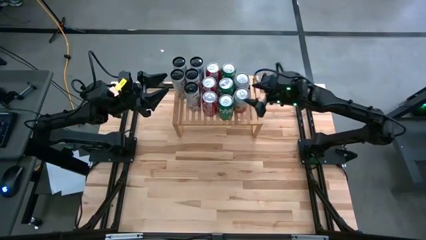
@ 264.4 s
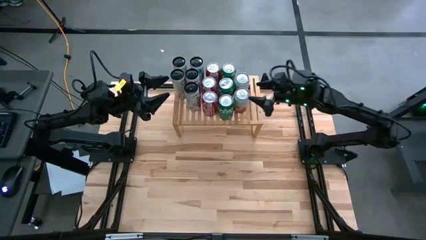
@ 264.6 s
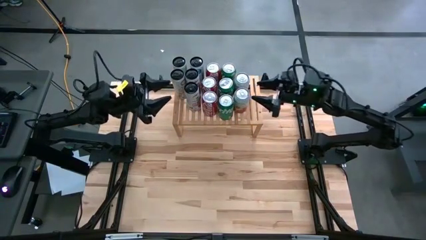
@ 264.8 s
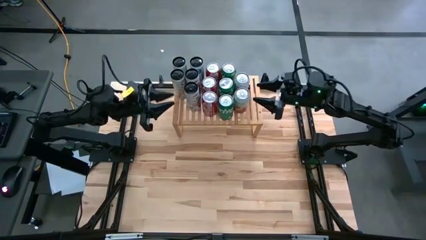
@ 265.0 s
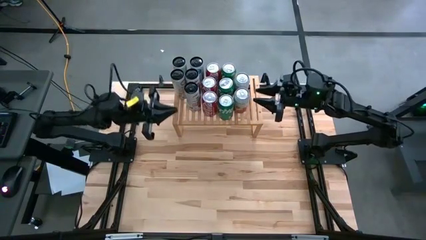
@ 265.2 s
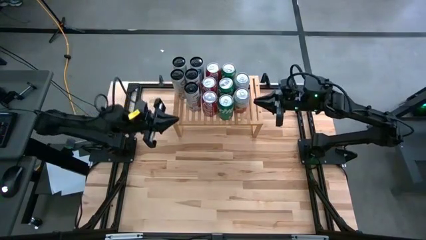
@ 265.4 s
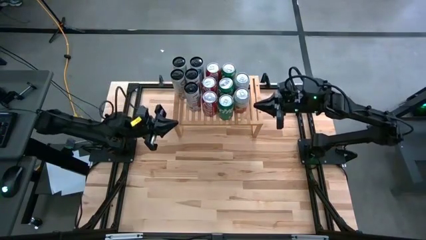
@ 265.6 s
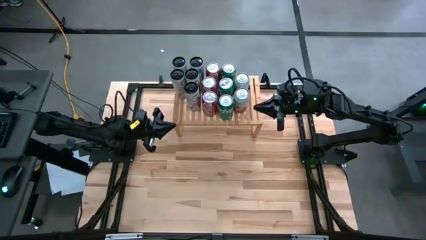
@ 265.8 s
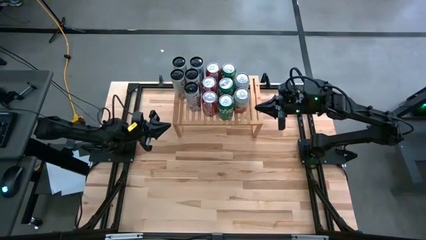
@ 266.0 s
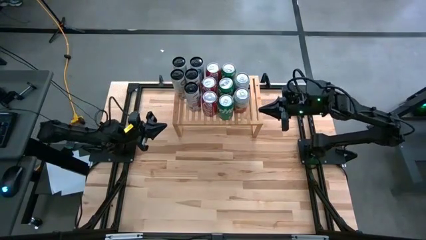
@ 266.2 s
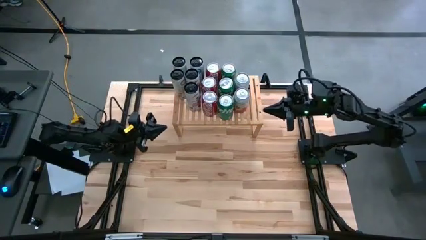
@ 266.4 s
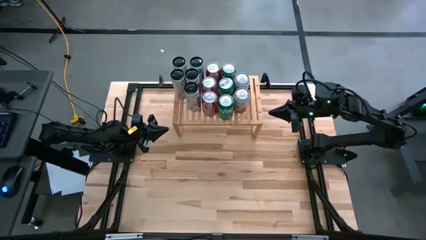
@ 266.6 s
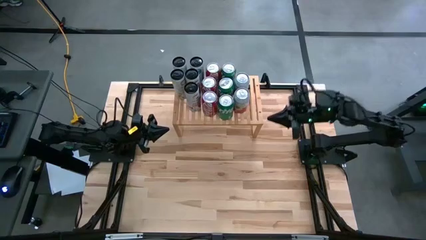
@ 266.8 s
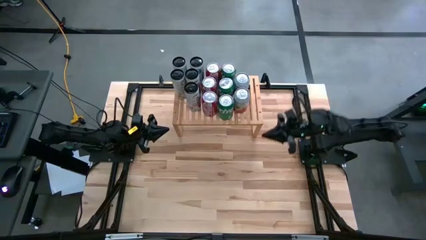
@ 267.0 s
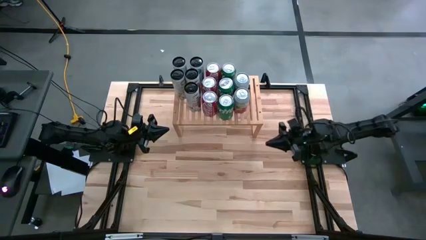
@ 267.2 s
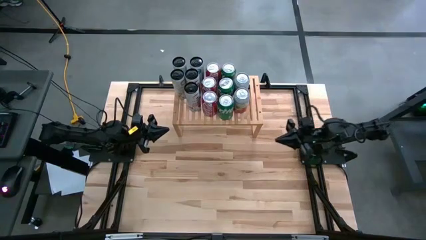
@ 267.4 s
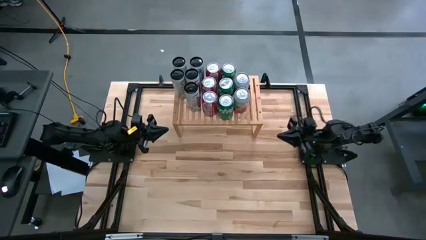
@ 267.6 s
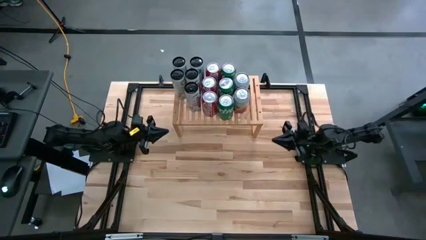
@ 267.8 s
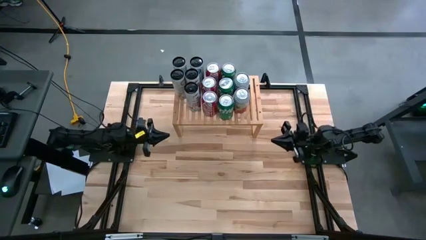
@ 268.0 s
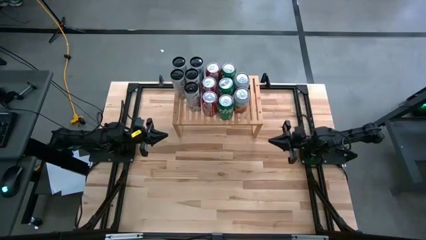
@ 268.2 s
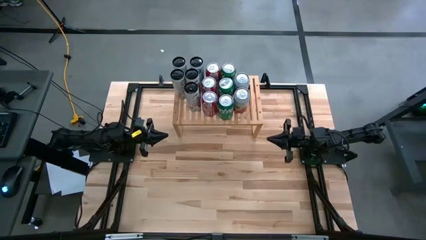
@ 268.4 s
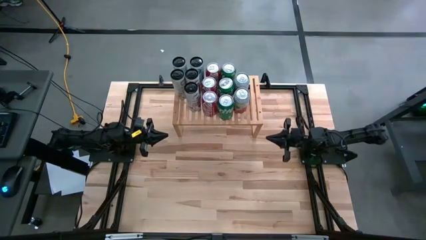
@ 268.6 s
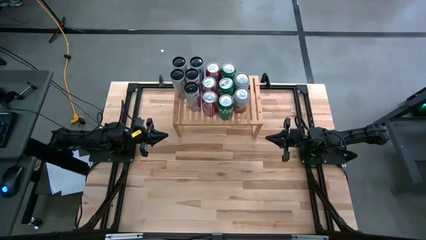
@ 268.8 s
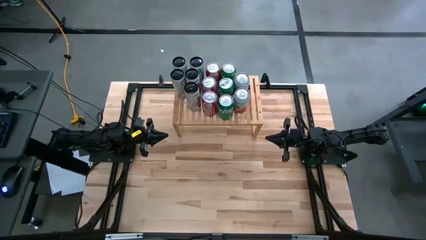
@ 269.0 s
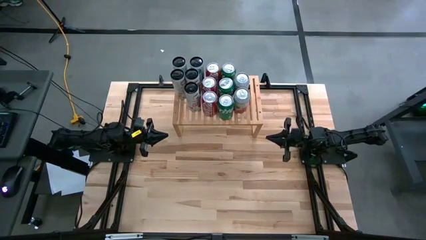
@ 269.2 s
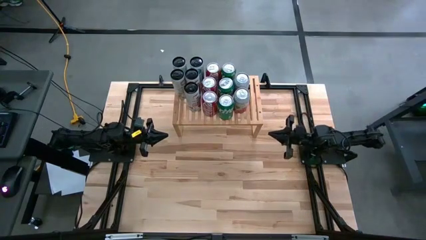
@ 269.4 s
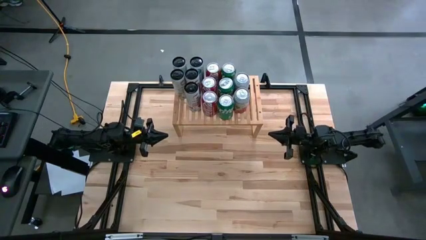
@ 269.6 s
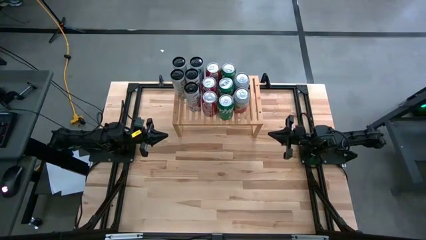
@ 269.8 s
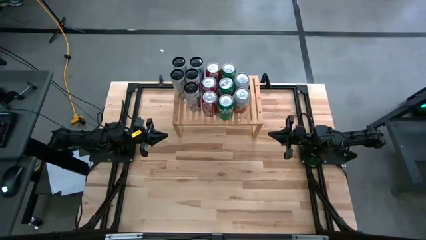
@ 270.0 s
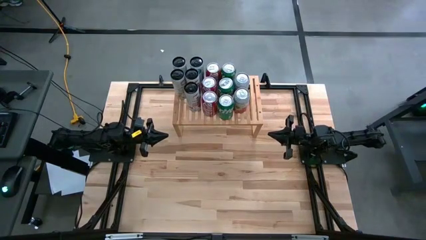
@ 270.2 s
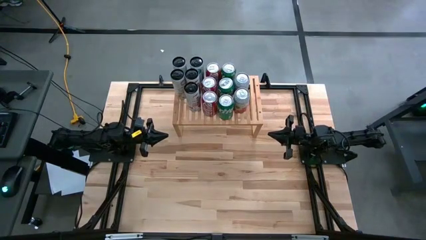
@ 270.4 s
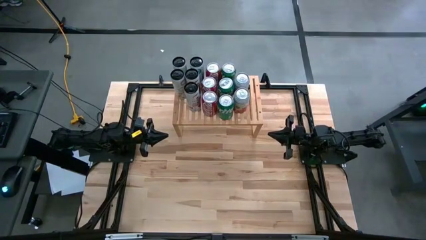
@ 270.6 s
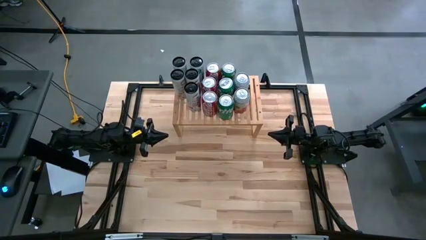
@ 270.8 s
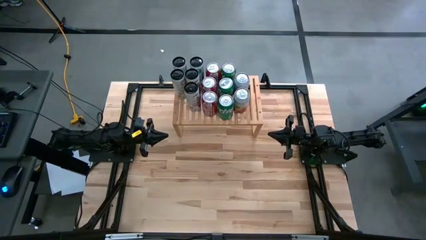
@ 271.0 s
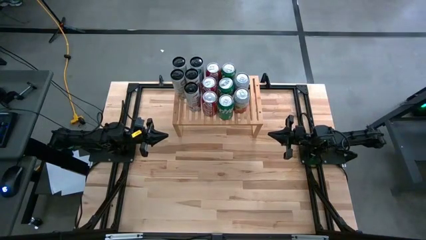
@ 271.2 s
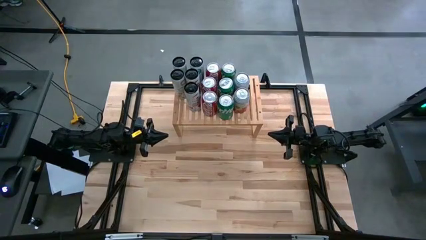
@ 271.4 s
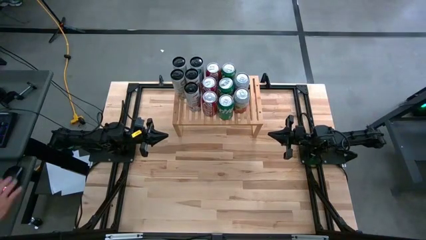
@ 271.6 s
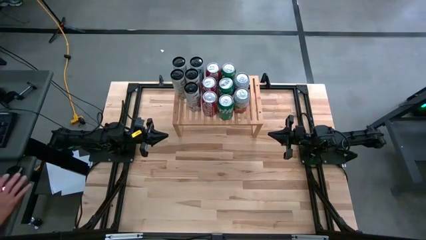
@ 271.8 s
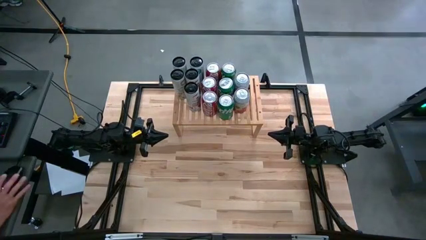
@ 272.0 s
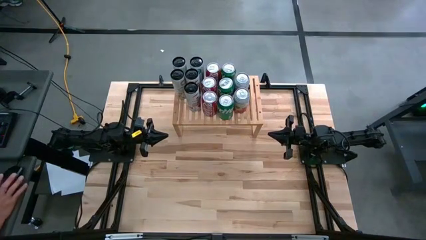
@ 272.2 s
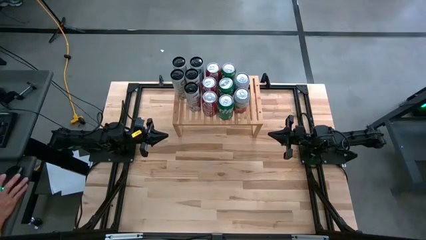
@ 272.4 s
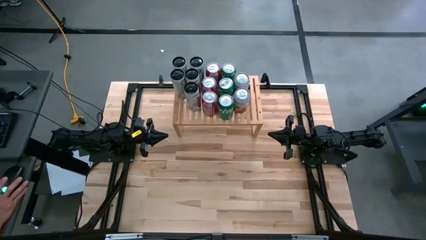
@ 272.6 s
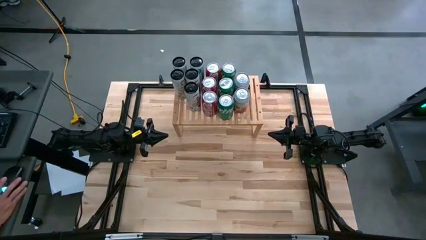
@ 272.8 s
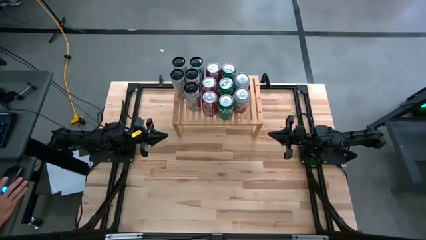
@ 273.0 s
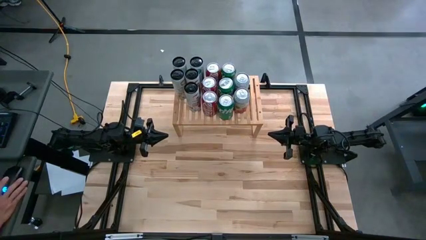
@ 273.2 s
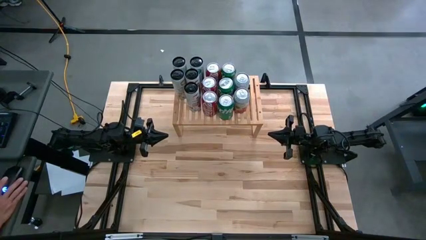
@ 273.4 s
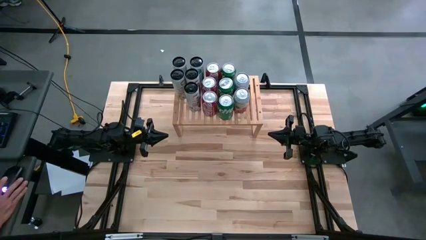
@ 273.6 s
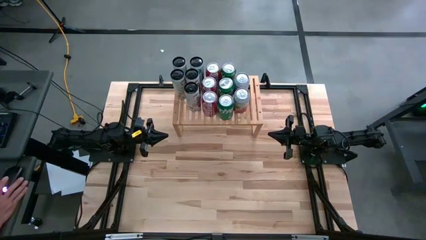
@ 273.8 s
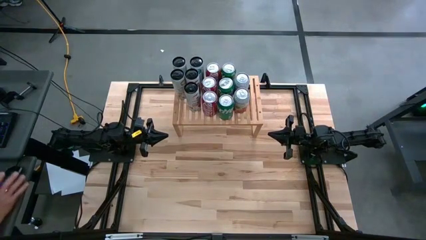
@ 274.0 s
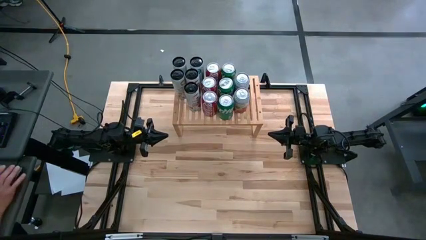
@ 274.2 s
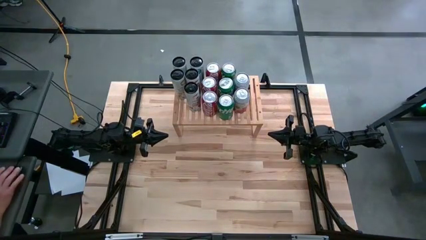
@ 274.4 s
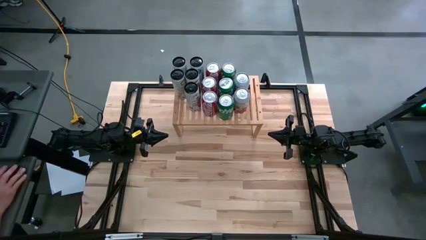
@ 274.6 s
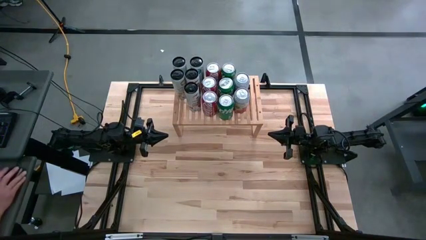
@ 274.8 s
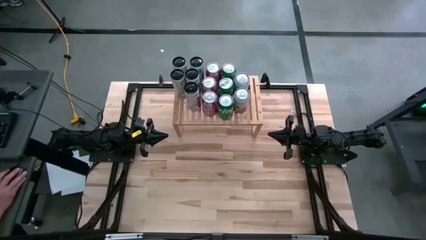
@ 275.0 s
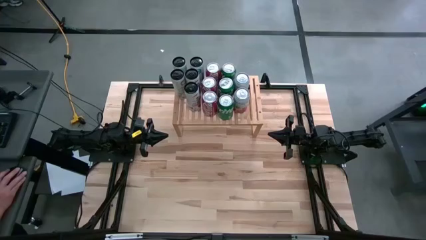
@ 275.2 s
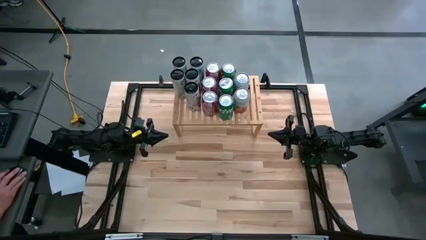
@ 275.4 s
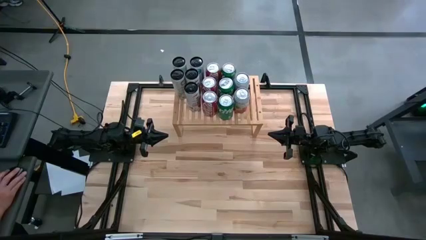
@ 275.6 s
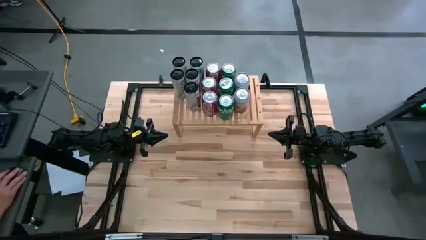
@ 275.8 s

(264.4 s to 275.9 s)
Task: Place canned beverage on shelf
Return to Home Position
